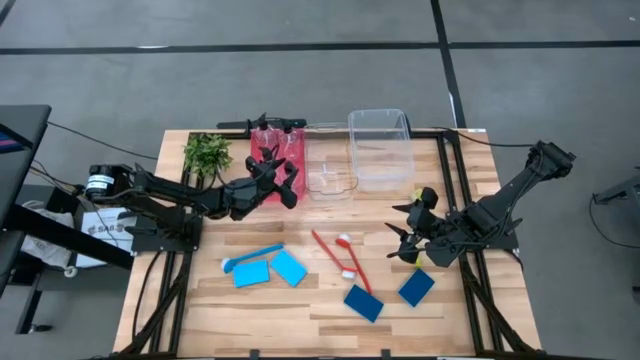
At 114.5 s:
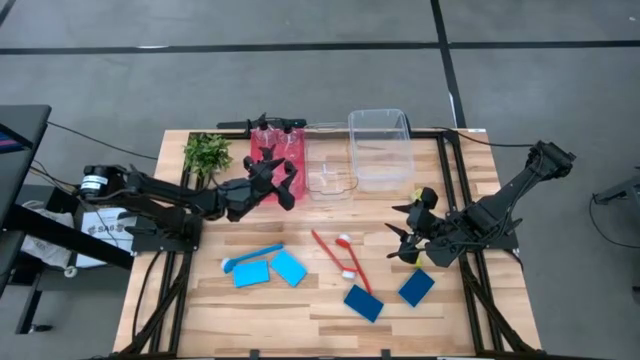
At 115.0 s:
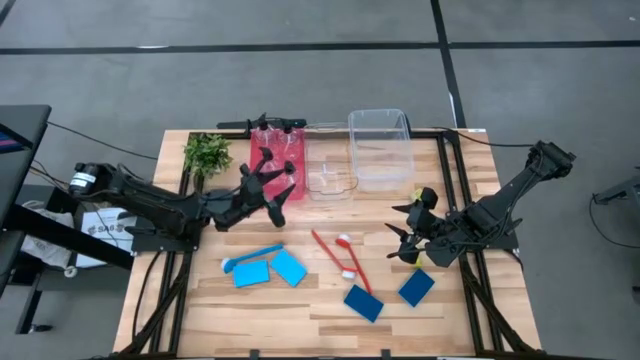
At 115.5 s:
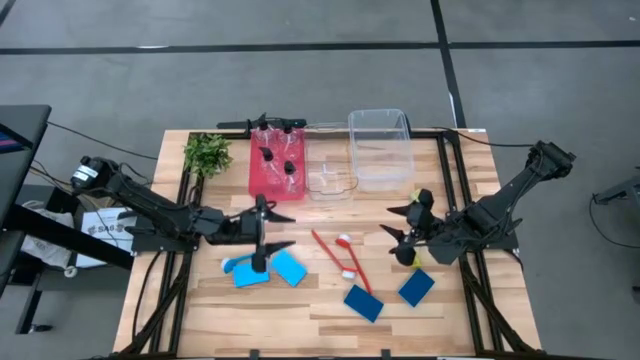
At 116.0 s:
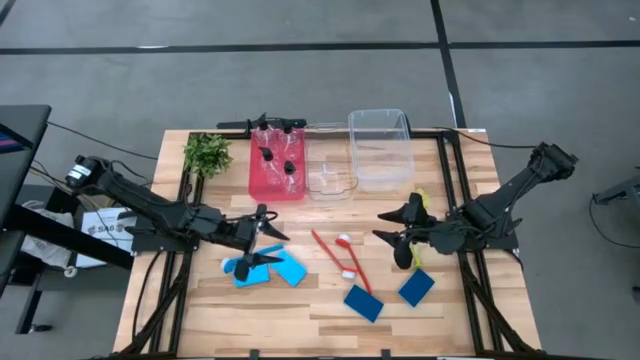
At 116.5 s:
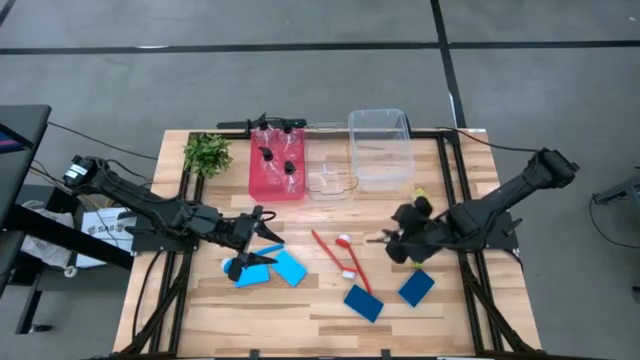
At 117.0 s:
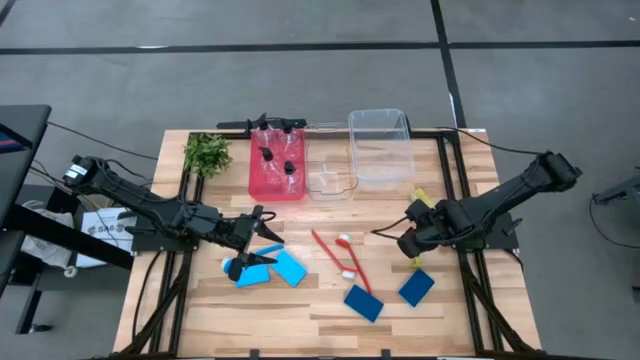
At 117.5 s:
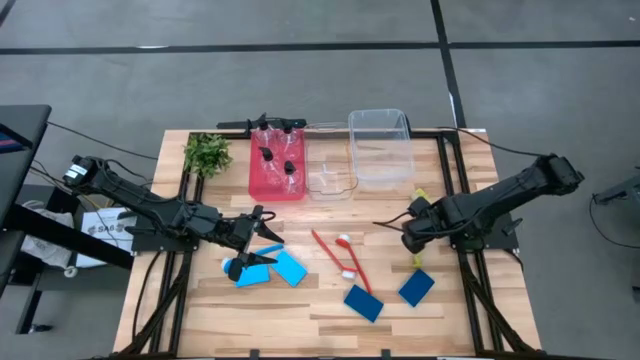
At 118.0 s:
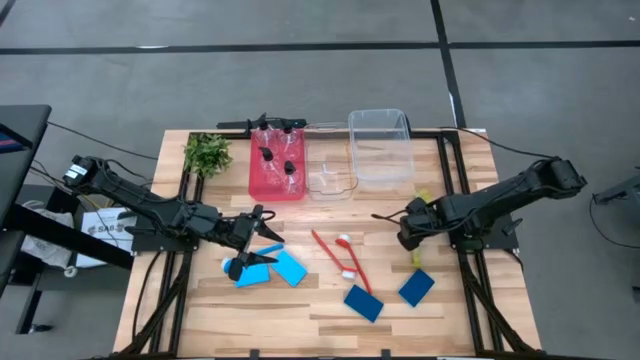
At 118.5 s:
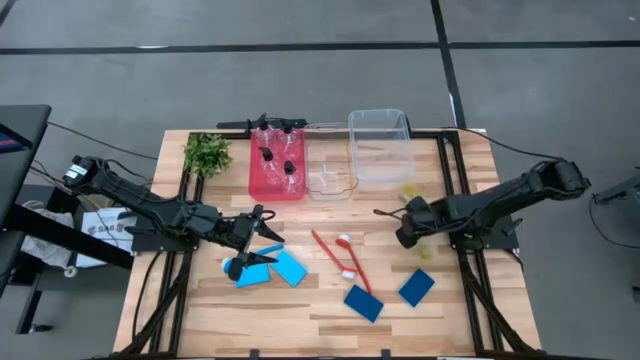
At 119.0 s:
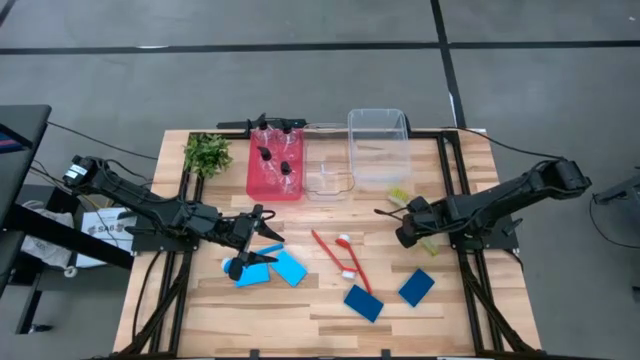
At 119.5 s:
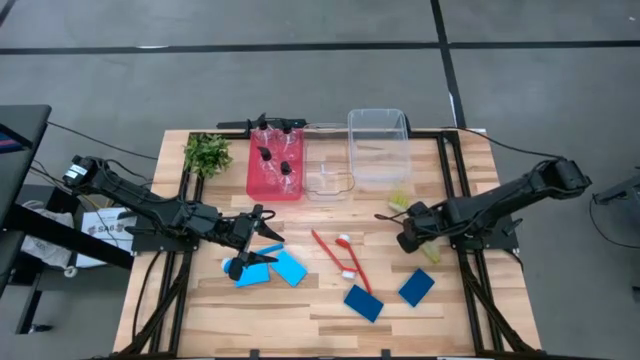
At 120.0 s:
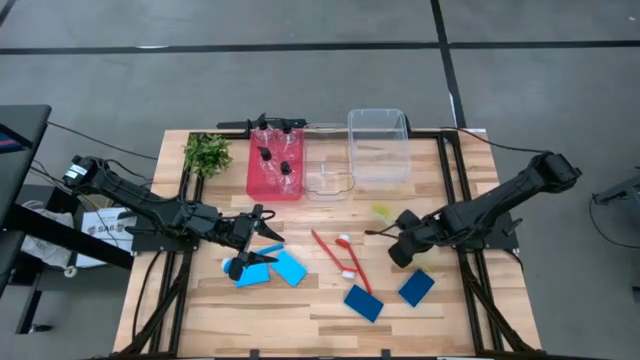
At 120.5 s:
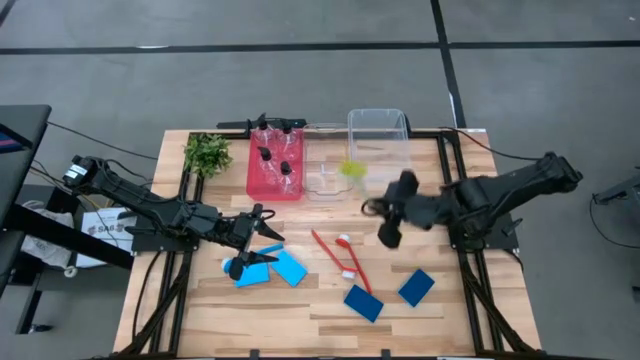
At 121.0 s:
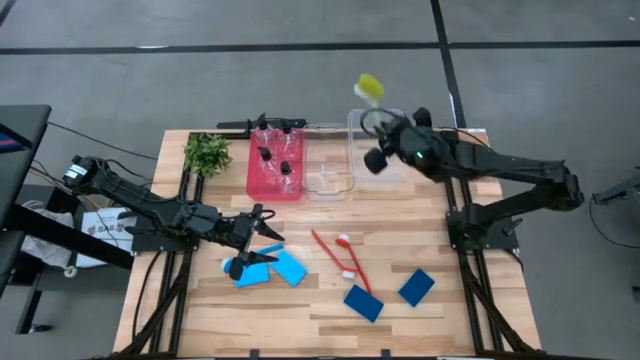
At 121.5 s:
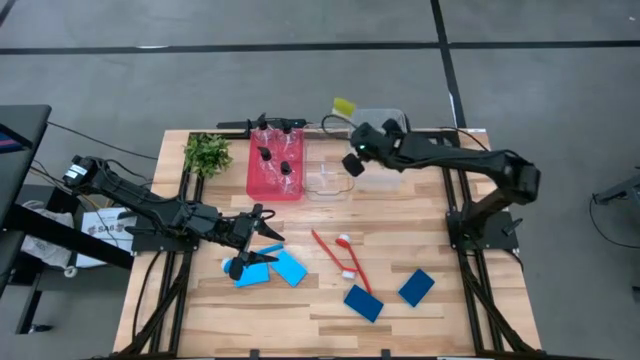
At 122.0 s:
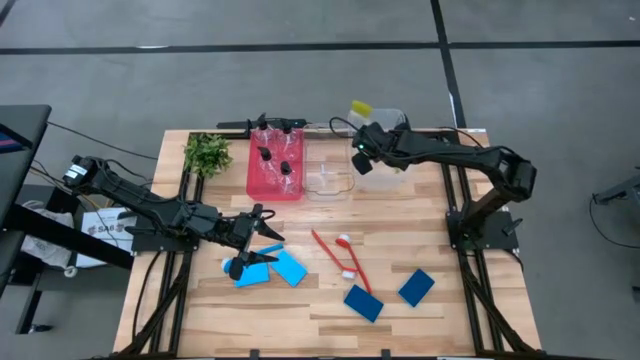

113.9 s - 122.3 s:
Task: Pick & Place Kitchen Sink Supplies
Put the green dish brush into the right transparent bin

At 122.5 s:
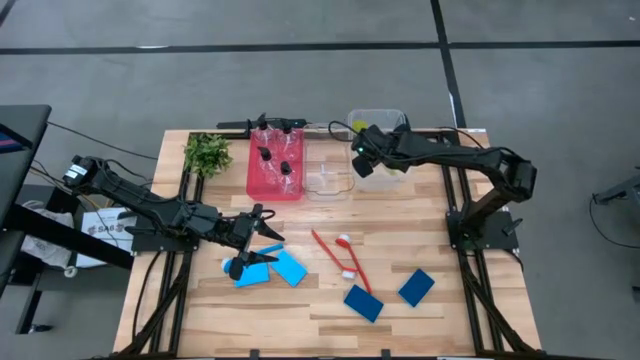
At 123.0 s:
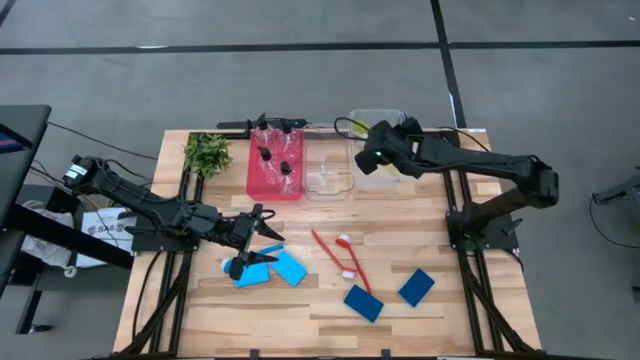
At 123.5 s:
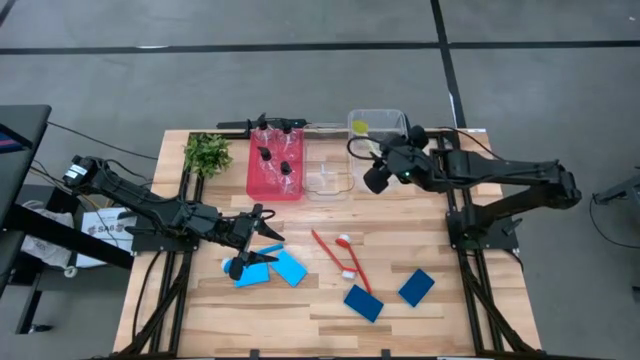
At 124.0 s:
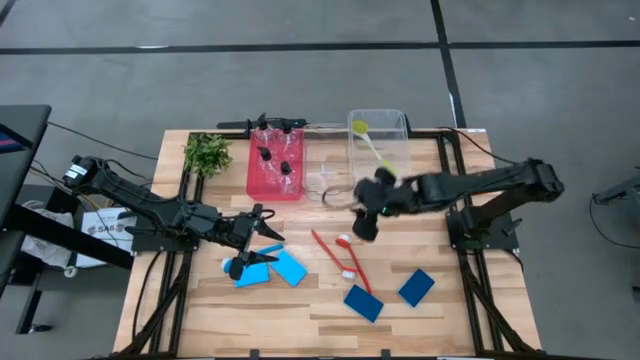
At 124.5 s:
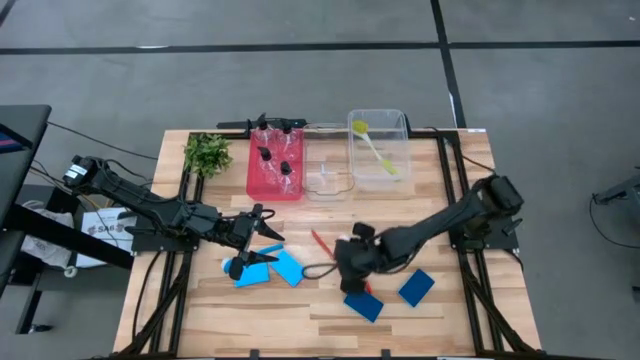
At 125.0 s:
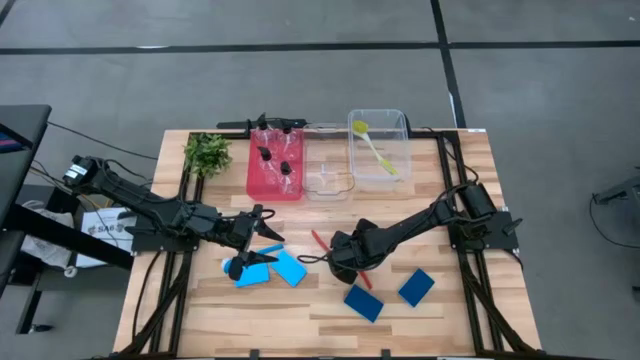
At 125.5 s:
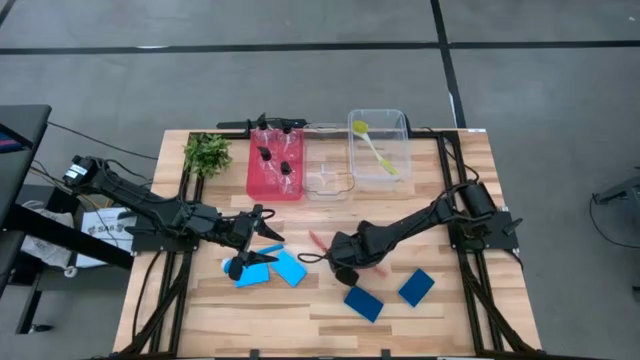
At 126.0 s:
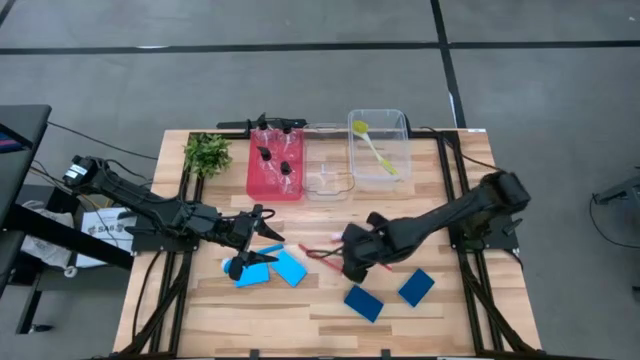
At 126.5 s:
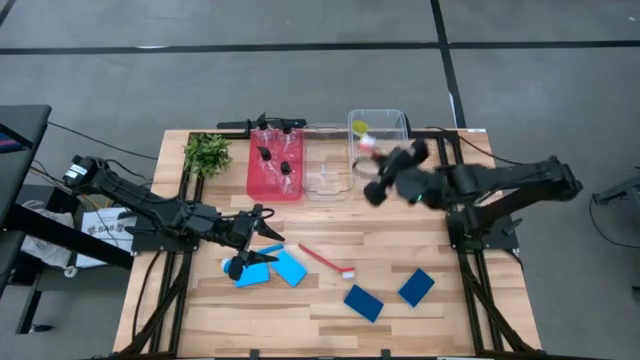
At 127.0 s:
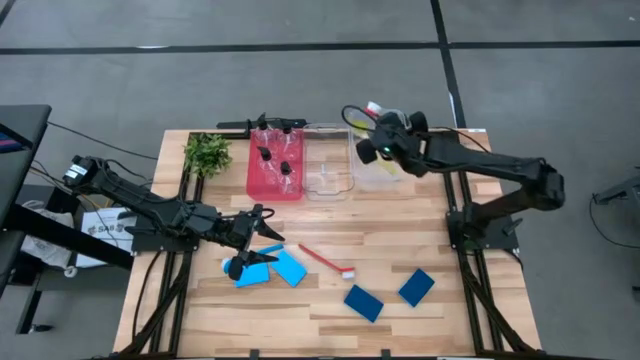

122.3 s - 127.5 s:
Put the right red dish brush into the right transparent bin

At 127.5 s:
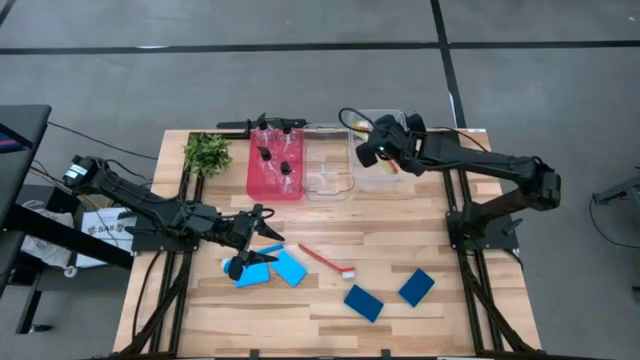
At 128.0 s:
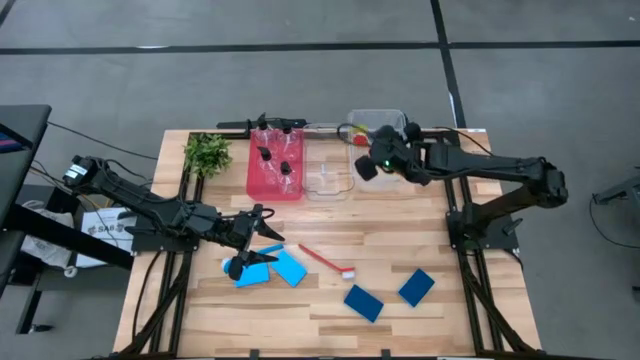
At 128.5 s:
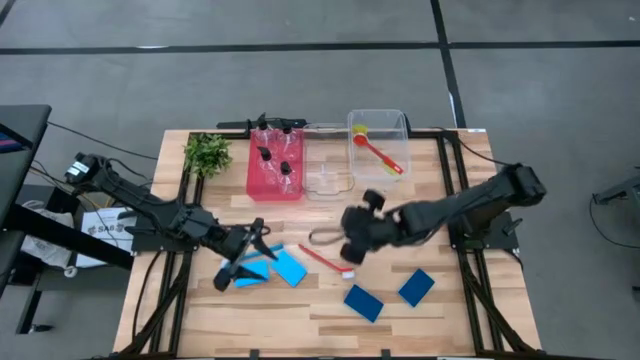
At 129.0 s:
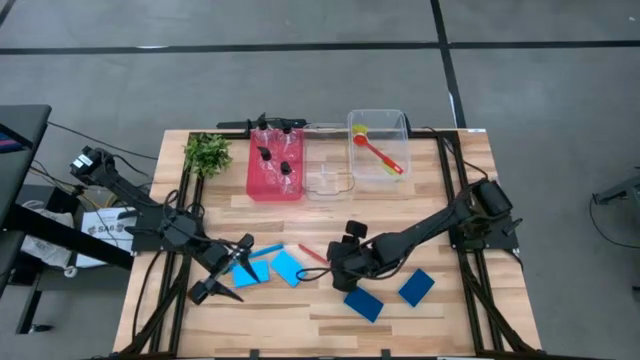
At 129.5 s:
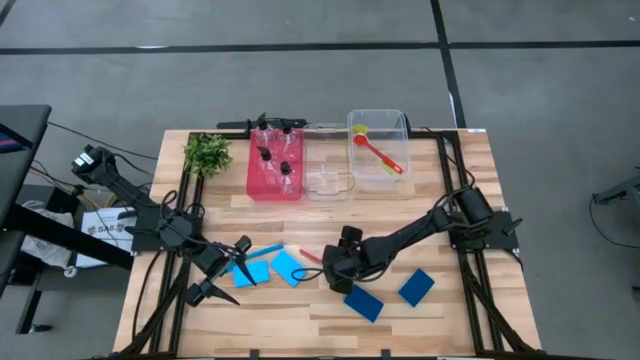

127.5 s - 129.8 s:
Put the red dish brush into the right transparent bin

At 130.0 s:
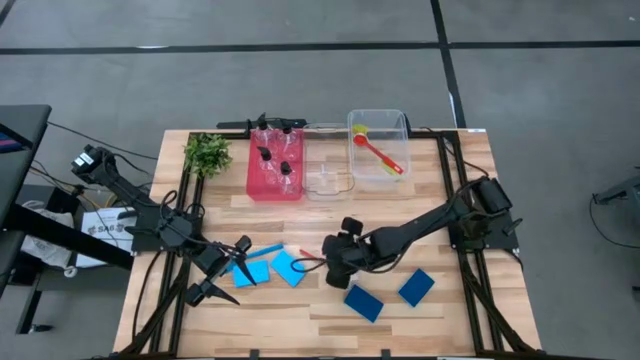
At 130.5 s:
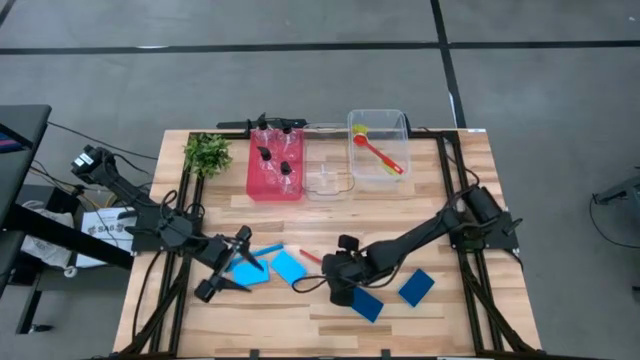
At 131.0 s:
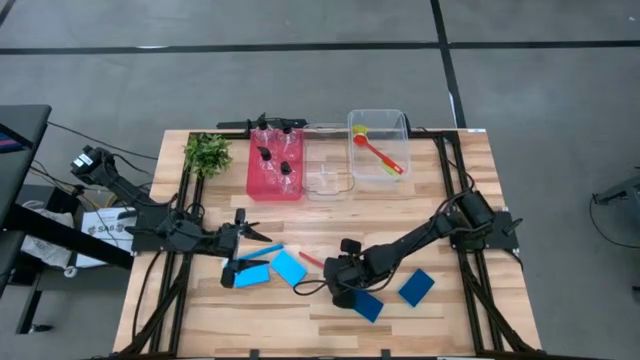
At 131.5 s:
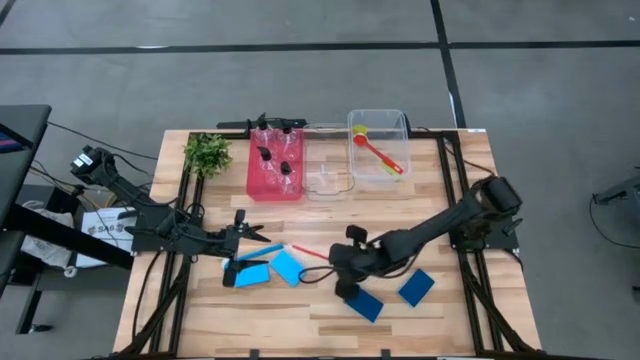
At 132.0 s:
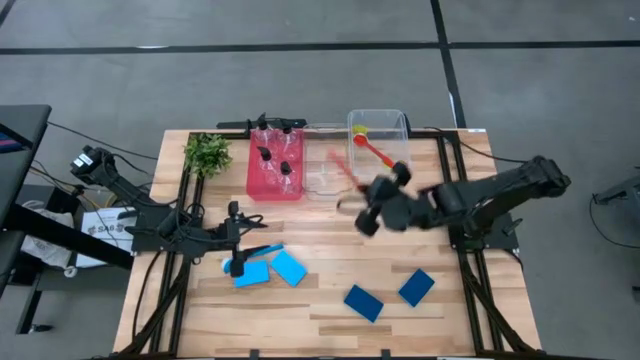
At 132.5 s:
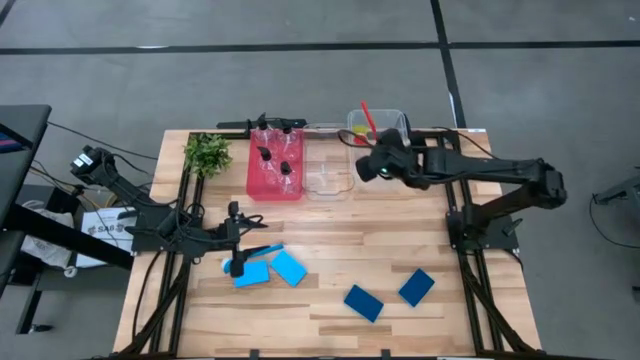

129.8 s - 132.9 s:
Put the red dish brush into the right transparent bin
